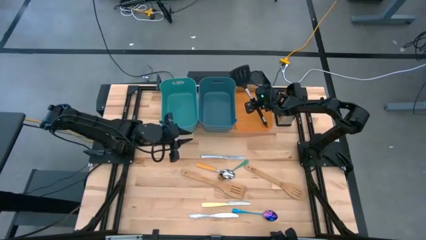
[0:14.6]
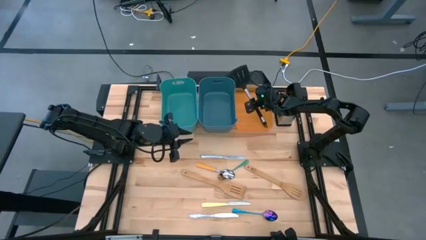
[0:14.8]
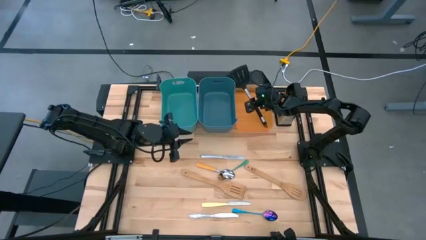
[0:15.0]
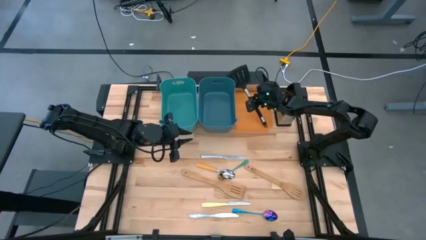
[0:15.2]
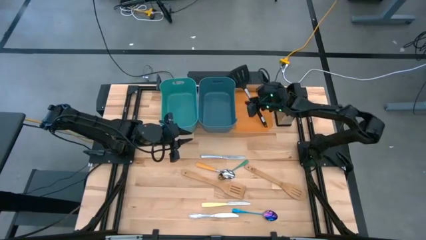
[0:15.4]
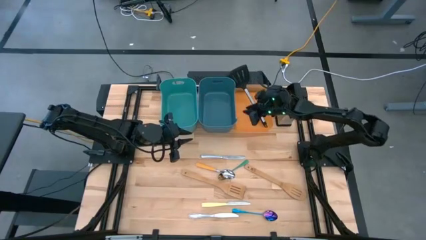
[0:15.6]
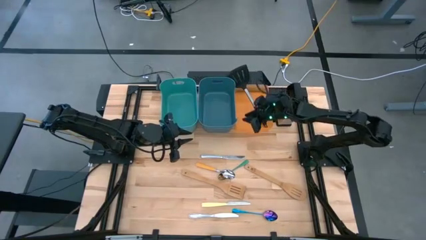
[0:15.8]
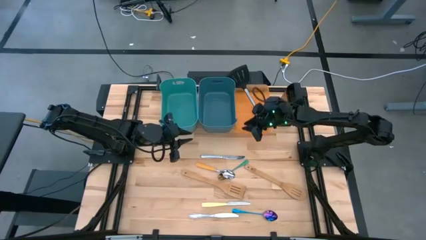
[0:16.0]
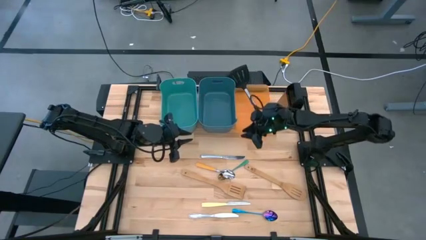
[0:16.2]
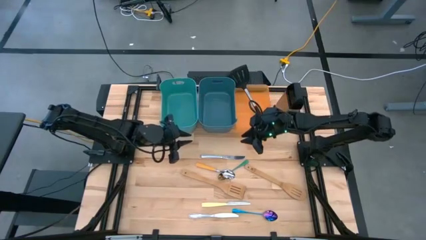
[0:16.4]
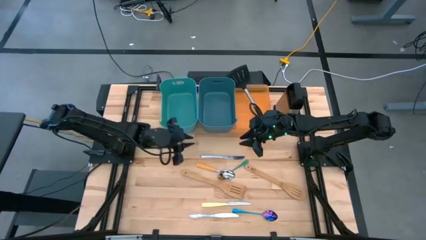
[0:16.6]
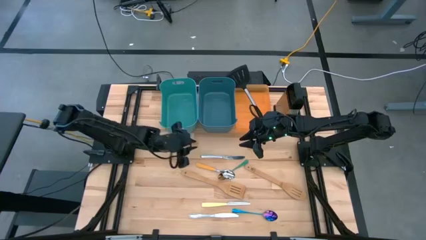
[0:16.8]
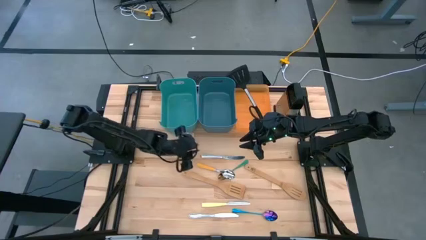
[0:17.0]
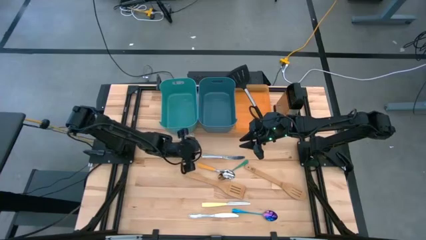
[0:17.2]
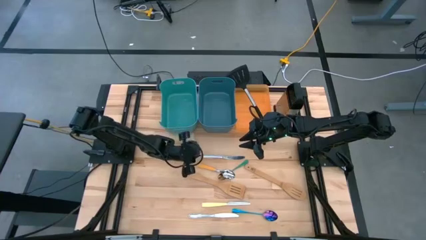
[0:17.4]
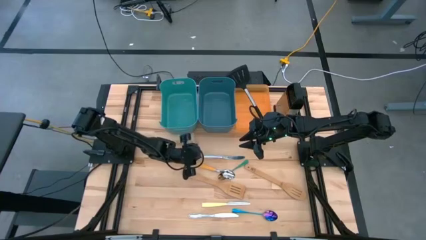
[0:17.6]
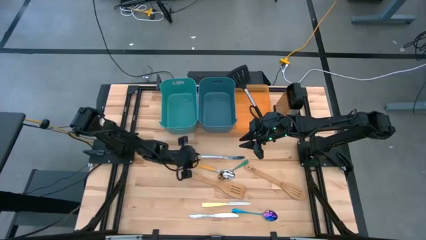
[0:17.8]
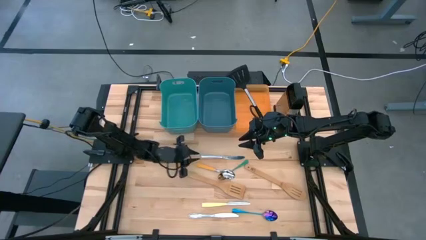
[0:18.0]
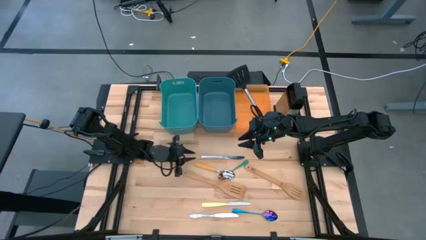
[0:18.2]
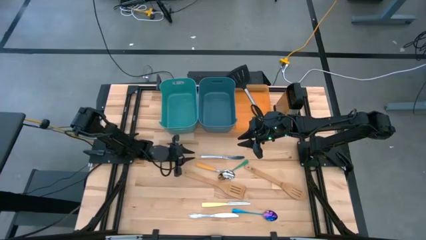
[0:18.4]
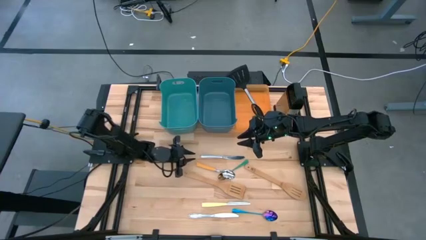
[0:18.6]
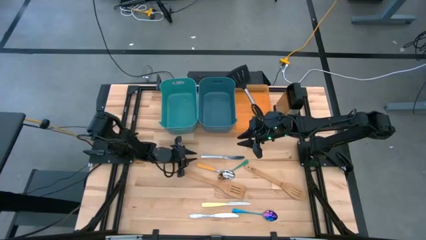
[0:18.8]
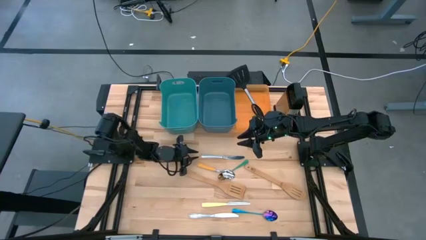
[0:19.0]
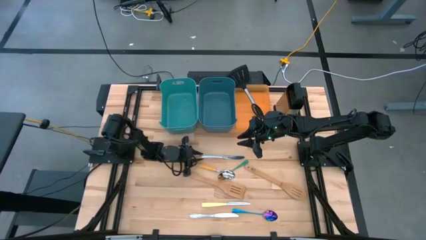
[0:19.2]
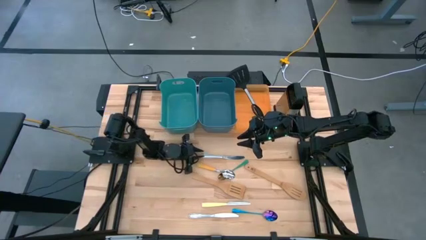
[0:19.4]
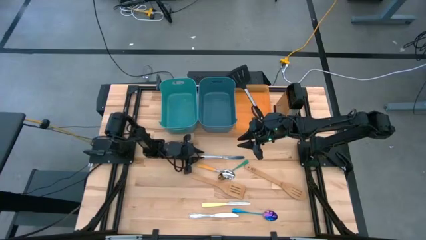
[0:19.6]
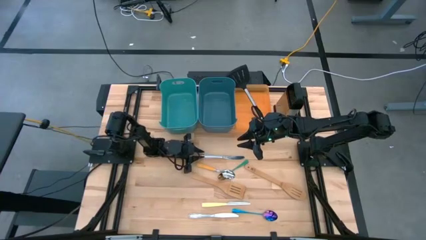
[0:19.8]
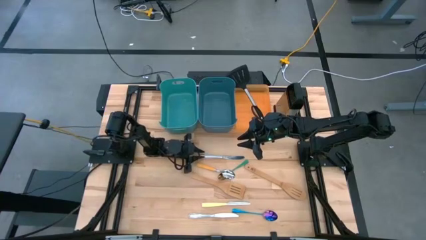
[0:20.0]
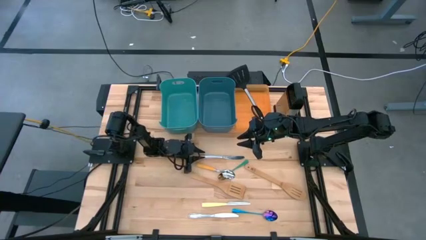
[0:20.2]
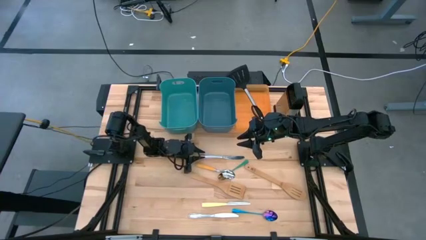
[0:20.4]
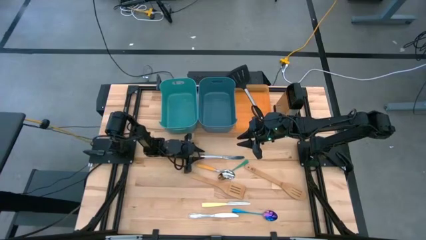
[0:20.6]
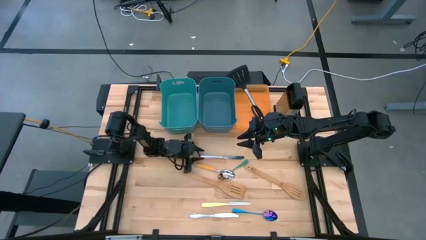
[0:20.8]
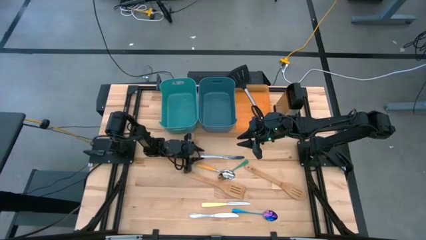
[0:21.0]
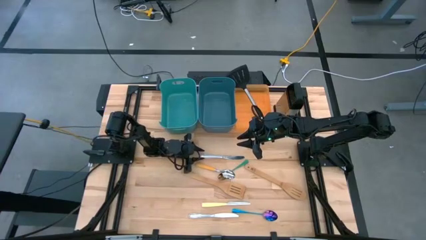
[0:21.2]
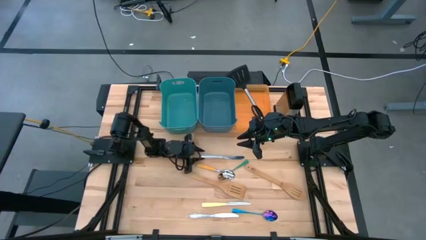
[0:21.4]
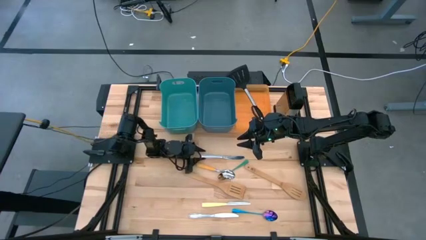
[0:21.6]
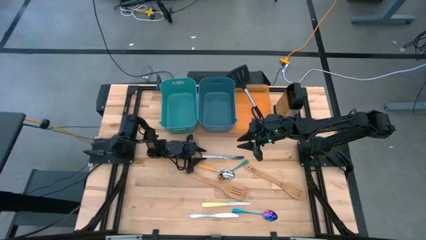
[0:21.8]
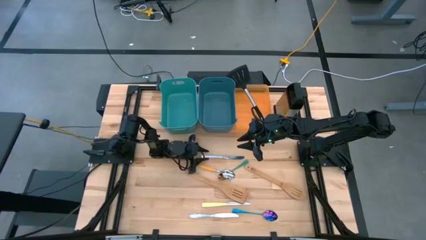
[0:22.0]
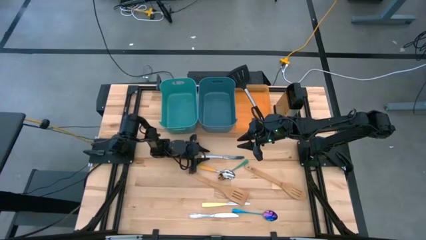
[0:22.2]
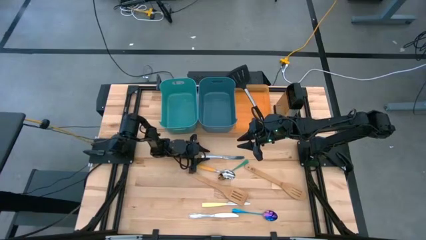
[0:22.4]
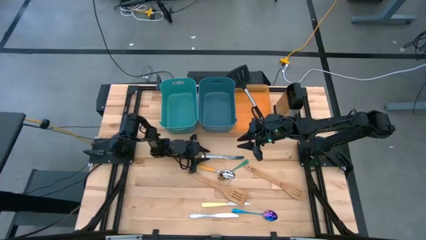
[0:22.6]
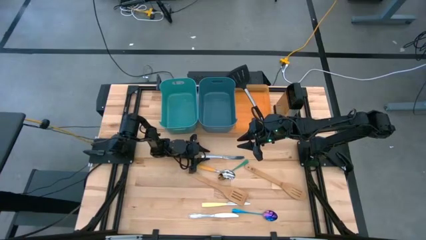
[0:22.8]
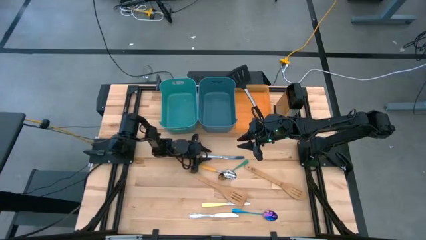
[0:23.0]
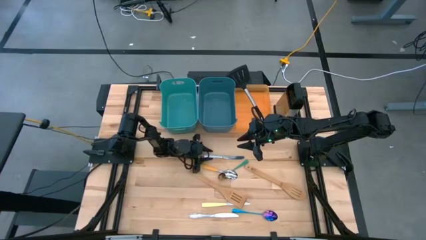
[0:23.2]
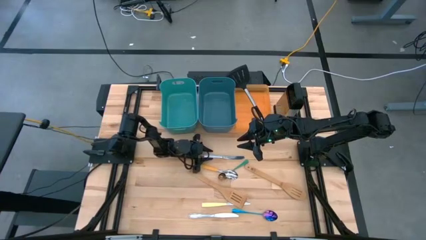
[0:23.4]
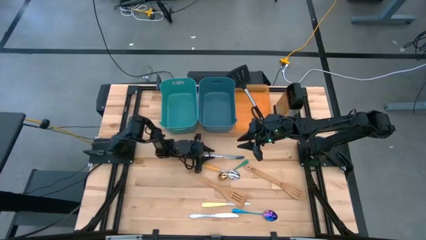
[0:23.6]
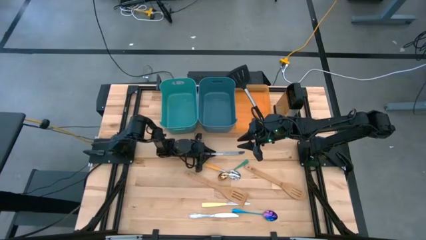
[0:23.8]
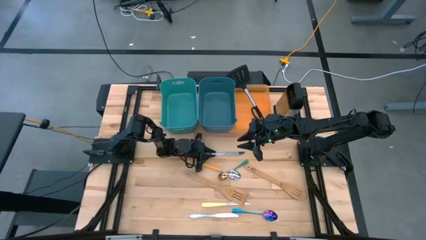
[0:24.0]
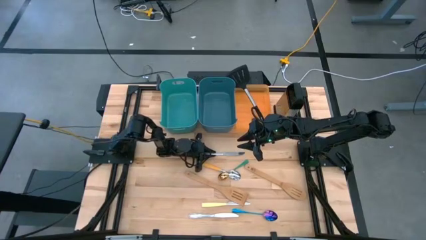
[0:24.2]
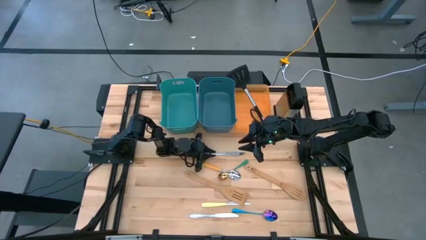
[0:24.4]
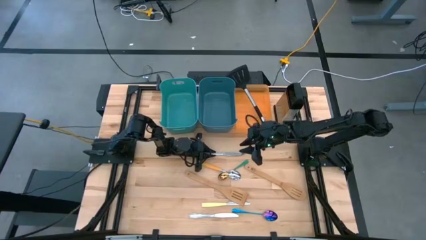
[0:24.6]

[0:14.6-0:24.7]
Task: Pick & Place Kitchen Items
Put the top silver table knife into the blue bin

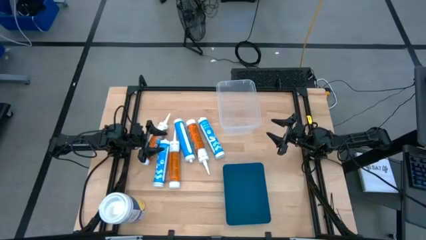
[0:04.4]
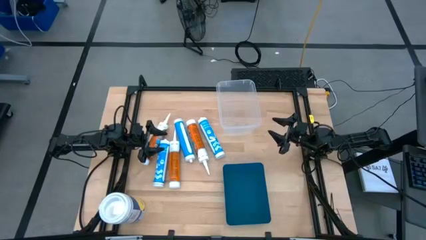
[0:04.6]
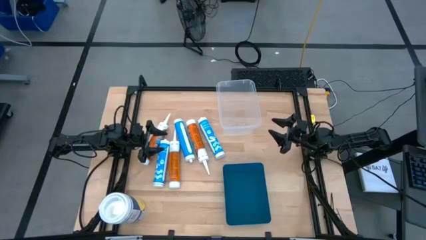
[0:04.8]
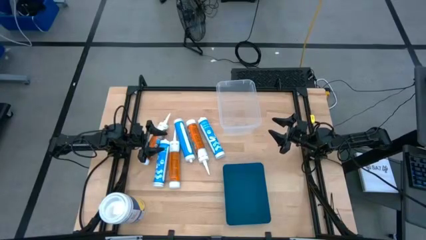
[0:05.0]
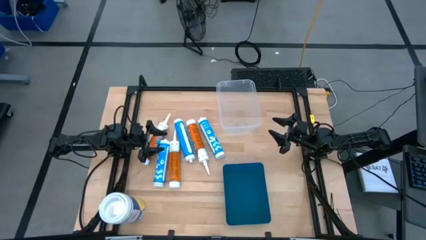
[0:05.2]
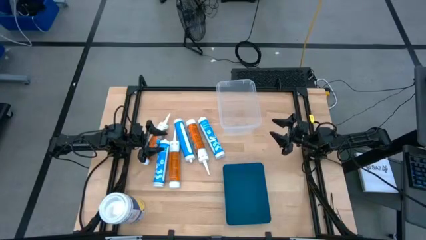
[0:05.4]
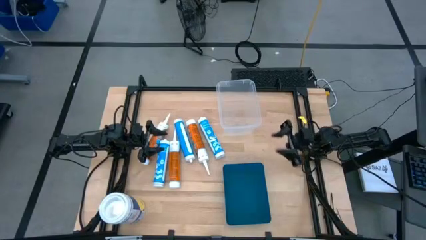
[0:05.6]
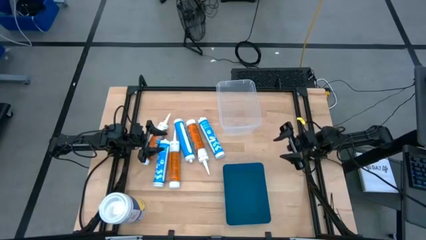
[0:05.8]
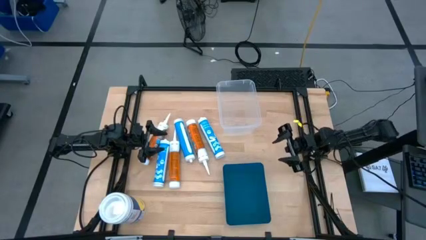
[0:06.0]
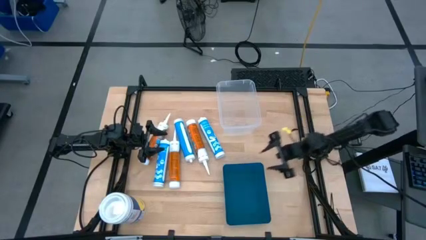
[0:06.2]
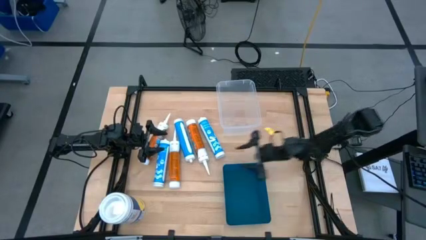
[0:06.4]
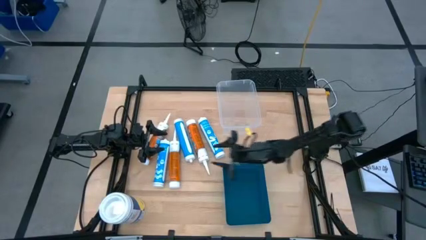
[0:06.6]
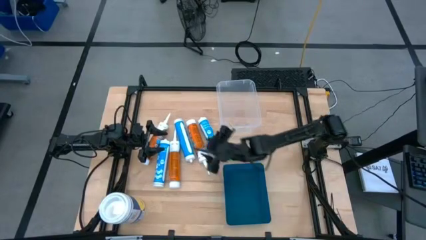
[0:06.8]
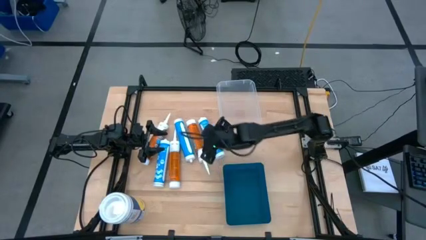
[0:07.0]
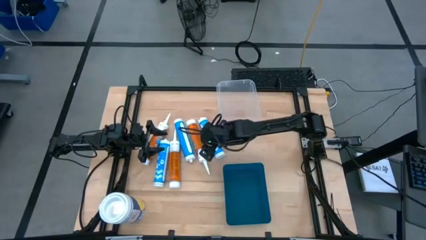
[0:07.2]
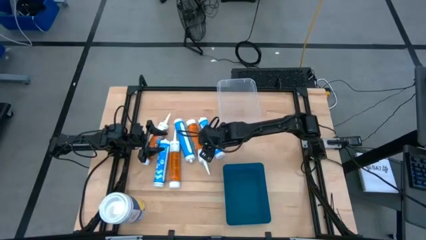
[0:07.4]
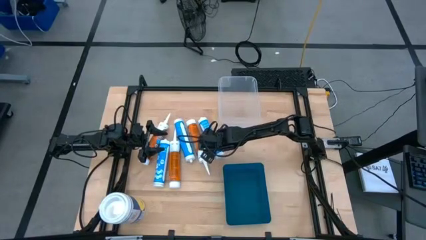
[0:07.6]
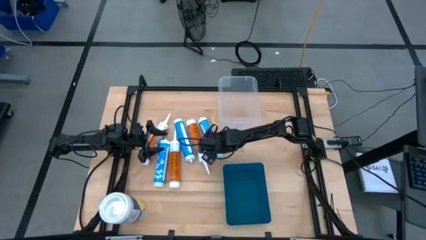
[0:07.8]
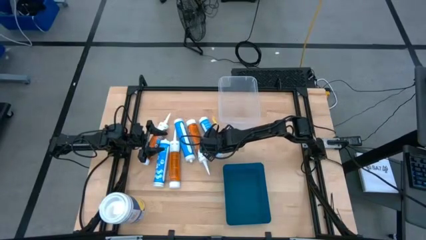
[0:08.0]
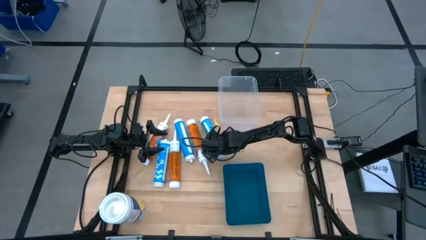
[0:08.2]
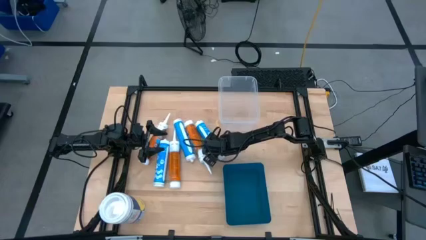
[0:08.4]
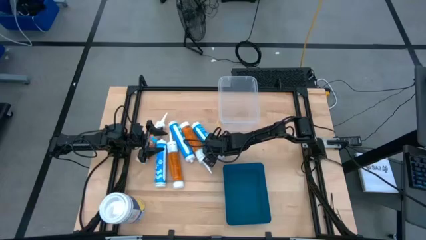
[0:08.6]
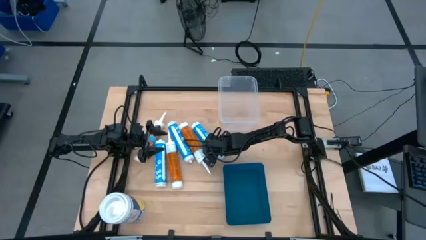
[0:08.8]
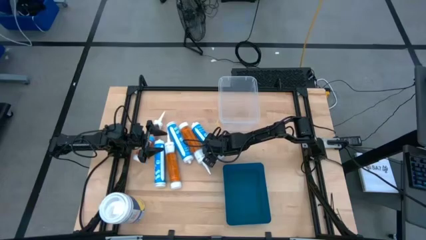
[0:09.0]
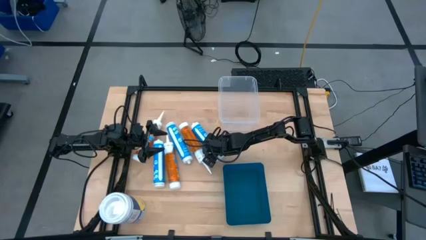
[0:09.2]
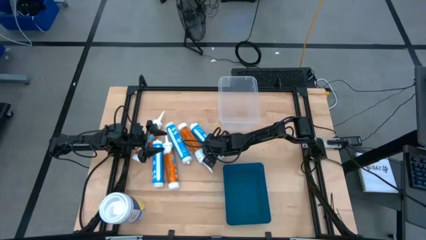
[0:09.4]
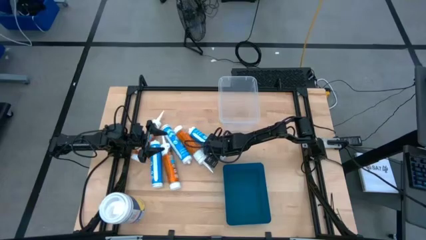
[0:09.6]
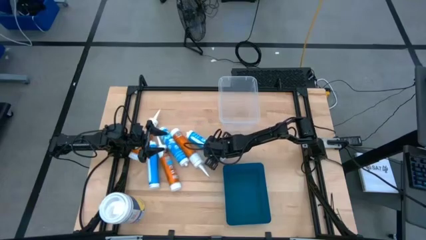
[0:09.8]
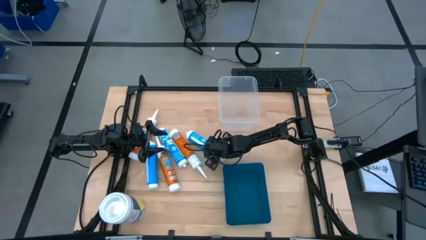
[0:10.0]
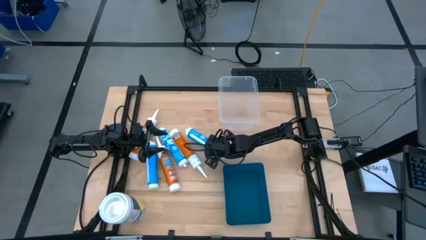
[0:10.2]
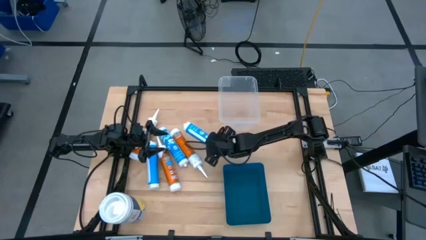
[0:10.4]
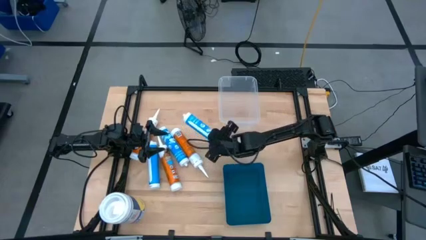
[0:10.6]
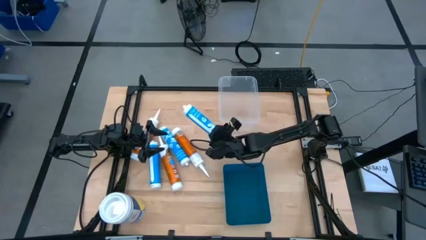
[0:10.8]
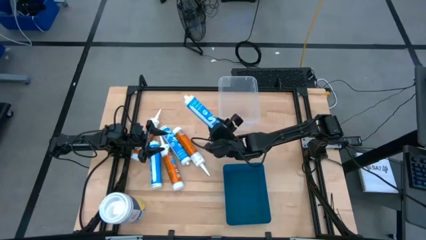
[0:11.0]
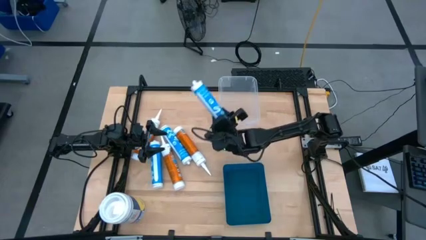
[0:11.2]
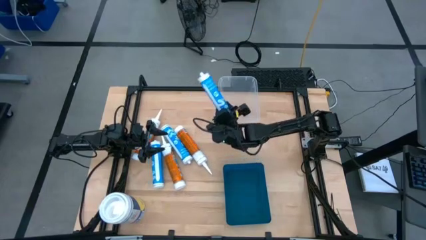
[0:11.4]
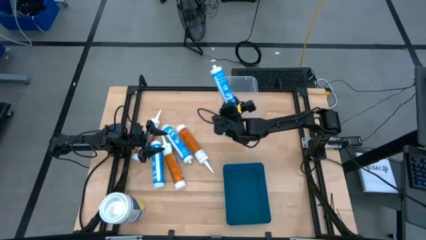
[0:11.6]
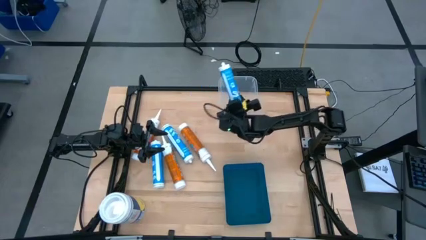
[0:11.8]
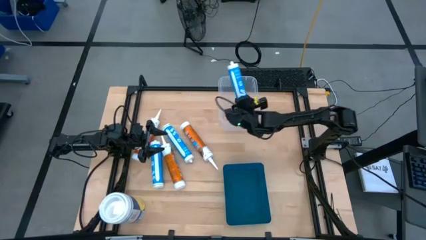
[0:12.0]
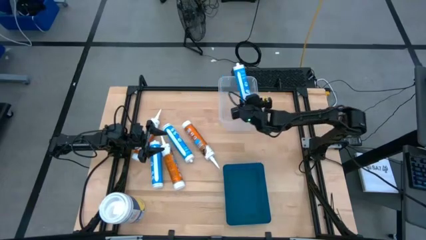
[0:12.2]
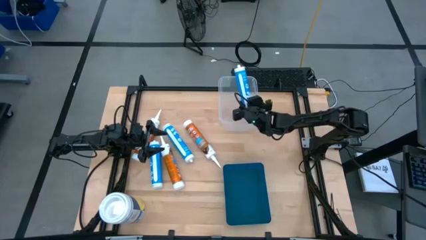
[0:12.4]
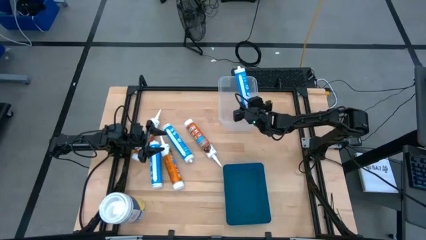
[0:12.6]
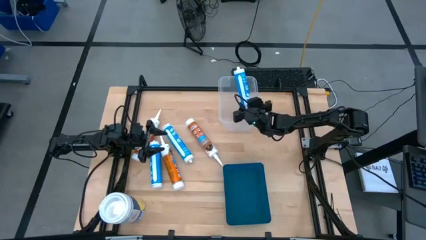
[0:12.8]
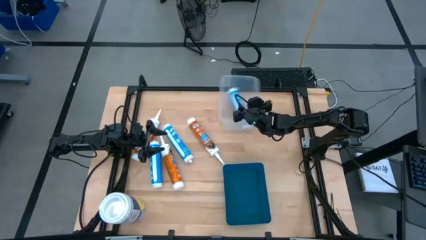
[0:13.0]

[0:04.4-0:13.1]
Task: Sort silicone sealant tubes
Put the right blue sealant into the transparent container
